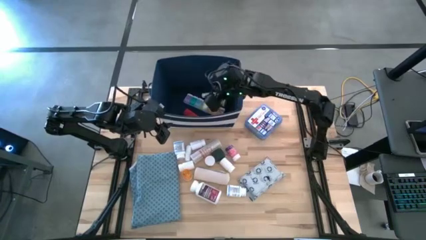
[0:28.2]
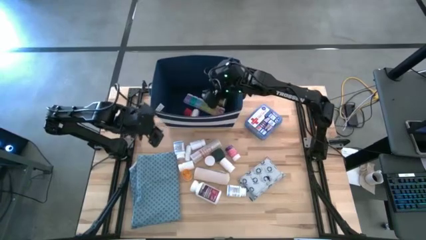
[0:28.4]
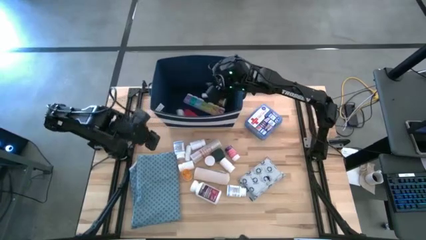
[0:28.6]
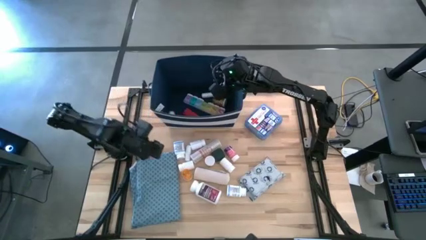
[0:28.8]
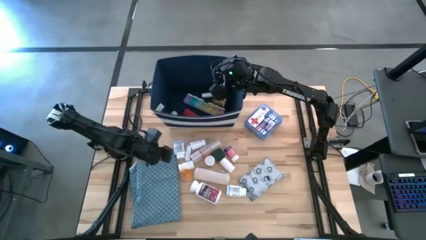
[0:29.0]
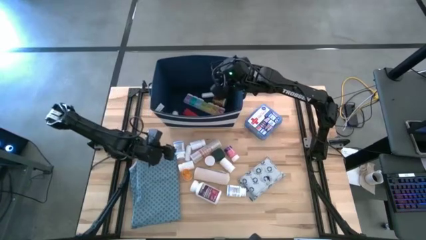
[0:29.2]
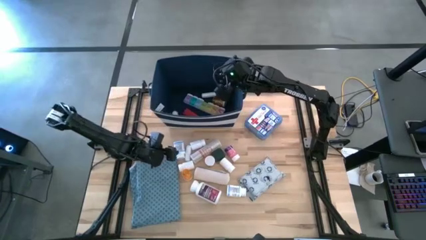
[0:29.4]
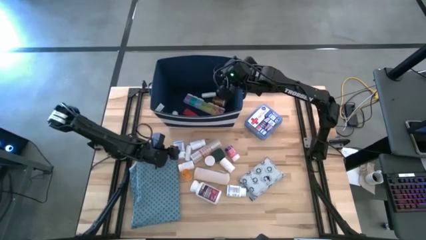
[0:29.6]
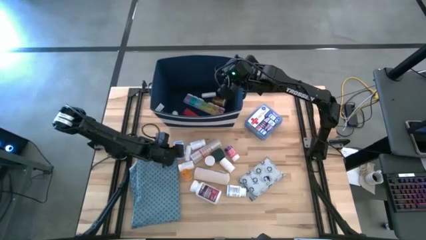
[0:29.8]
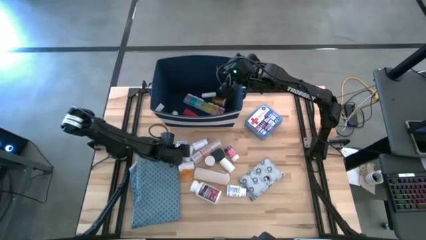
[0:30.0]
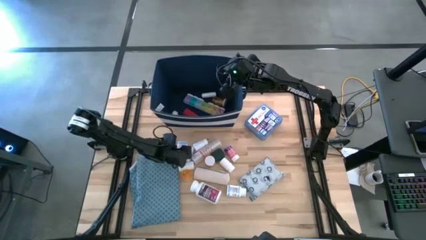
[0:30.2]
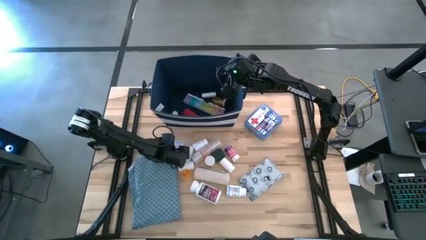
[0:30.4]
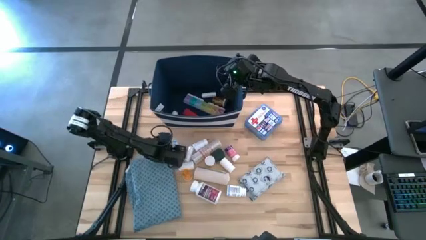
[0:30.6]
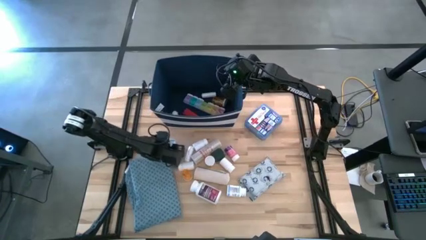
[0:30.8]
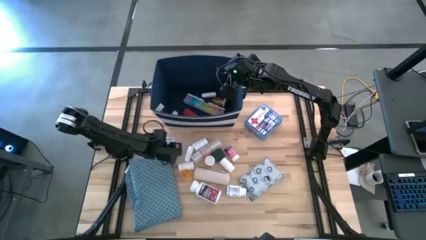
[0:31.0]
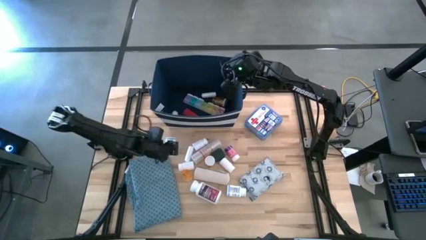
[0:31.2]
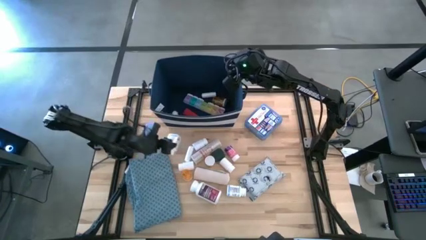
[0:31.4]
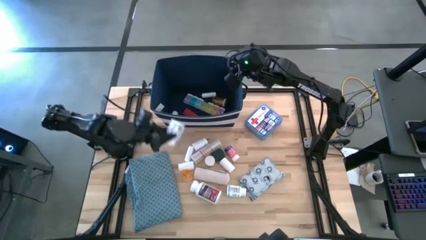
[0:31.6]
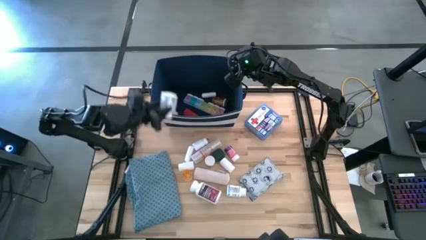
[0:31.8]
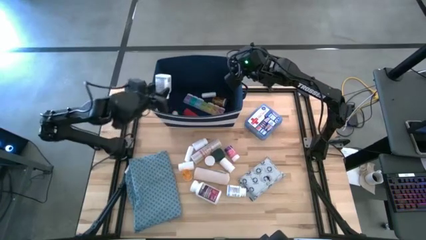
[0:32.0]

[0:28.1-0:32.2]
Task: Pick & place medical supplies in basket/bin
Put the medium white pill bottle into the blue bin

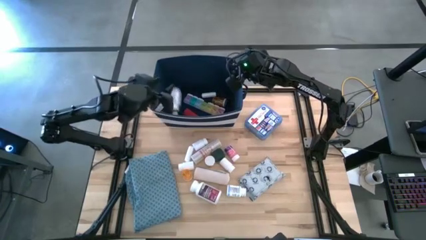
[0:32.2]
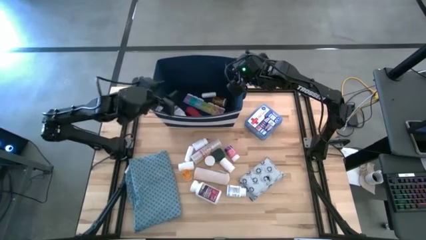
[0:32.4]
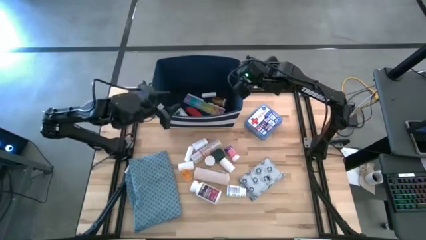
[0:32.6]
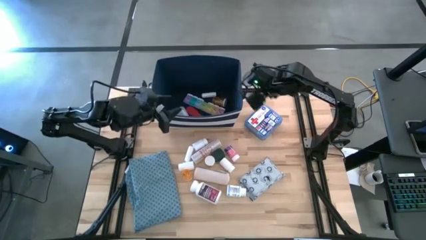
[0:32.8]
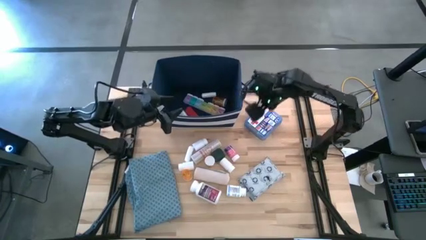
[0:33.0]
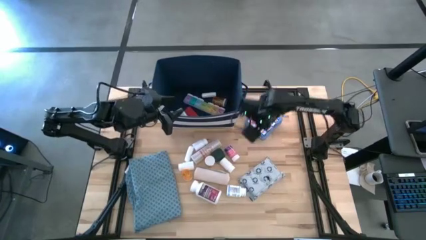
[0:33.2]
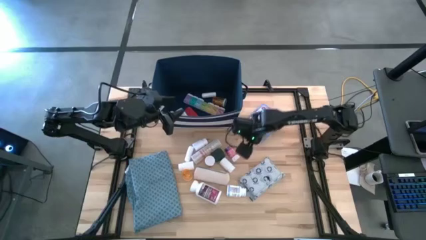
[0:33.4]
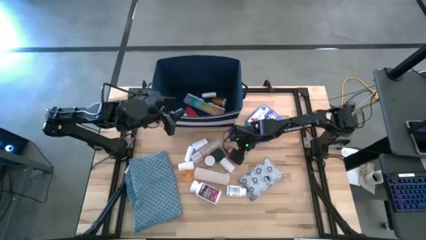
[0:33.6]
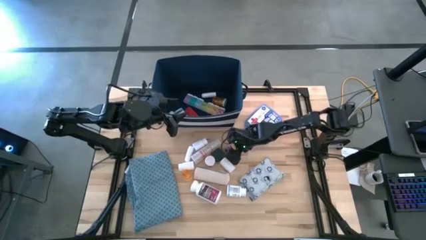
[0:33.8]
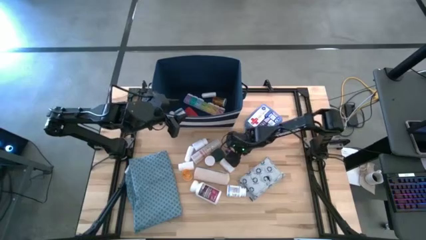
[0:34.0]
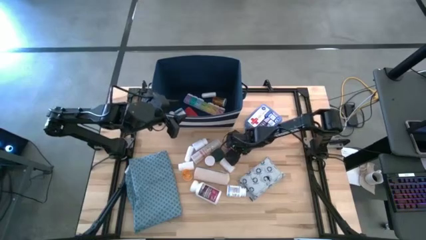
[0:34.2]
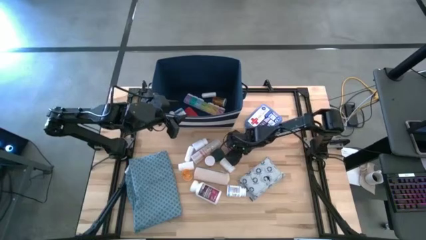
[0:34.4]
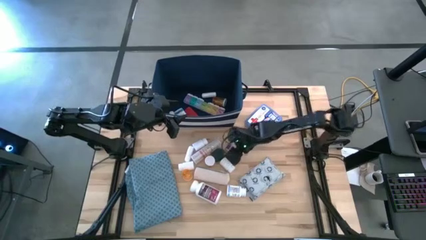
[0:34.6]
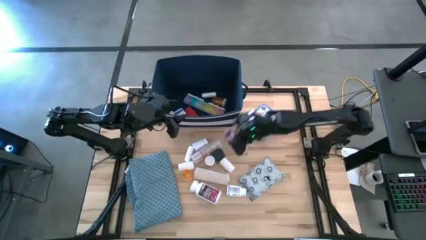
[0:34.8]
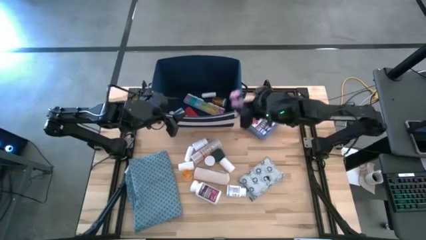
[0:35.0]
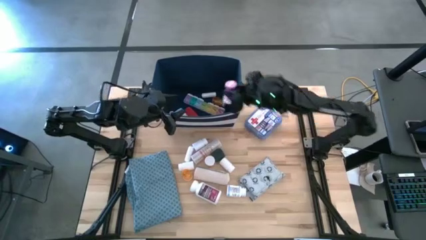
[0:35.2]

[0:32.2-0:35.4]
Put the pink pill bottle into the blue bin

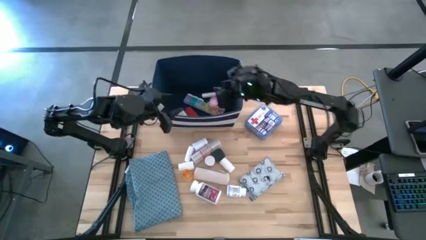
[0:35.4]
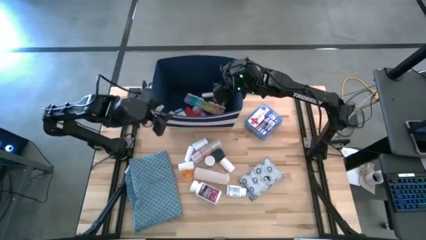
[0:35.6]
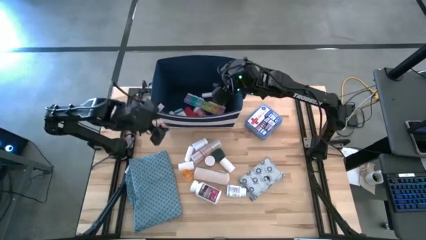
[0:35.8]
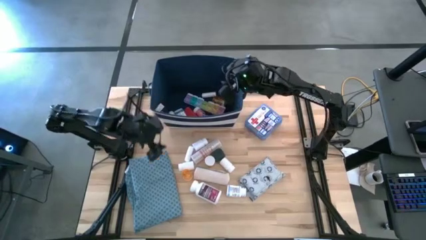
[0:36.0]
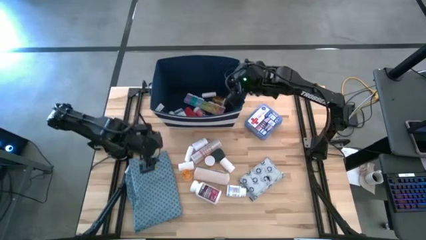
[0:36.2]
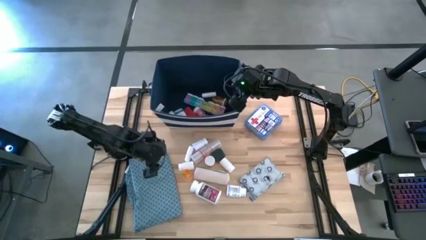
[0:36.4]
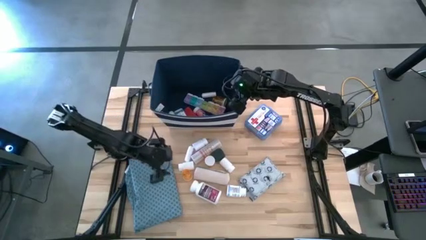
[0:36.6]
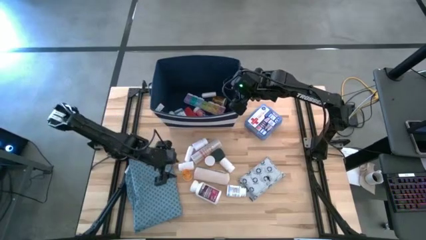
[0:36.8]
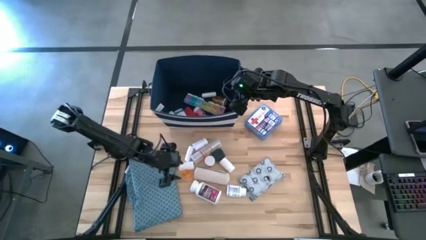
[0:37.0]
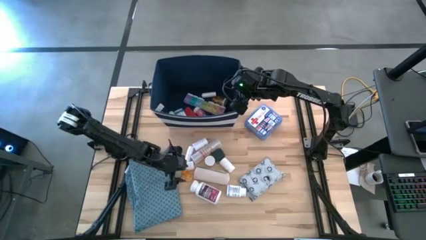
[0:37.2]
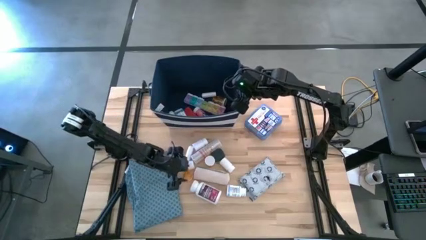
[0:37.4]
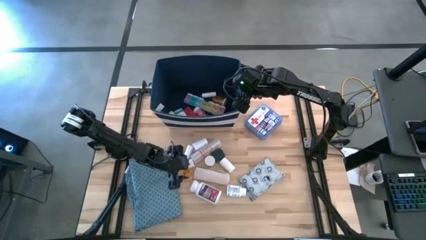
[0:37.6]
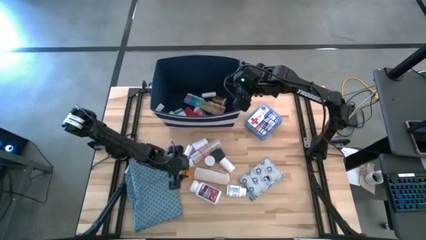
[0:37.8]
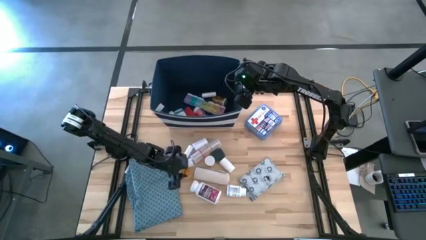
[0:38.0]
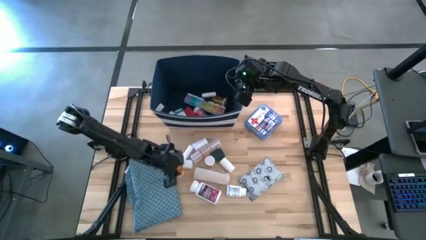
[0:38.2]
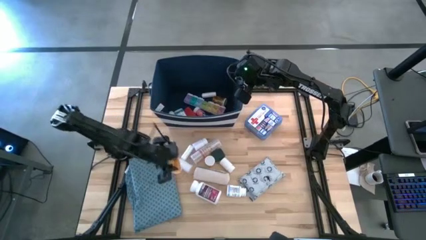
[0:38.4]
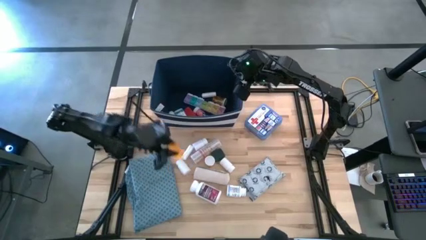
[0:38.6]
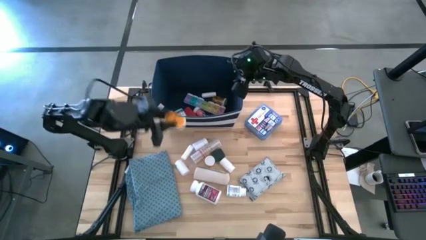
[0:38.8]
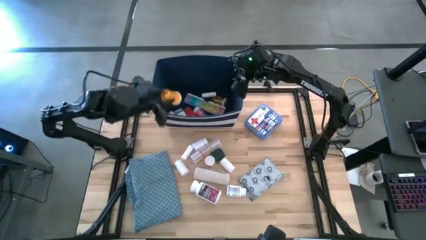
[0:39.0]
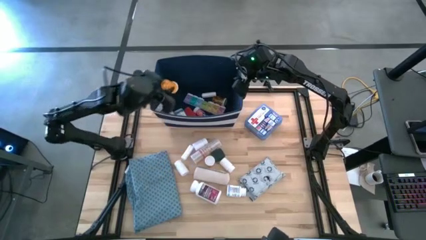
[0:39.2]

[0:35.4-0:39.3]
Put the orange pill bottle into the blue bin

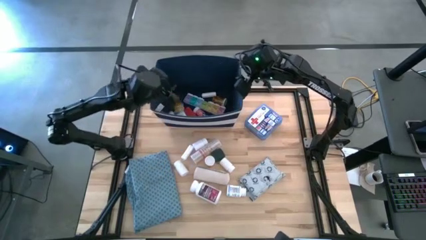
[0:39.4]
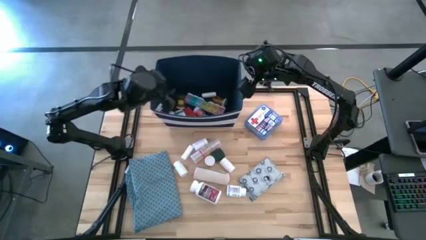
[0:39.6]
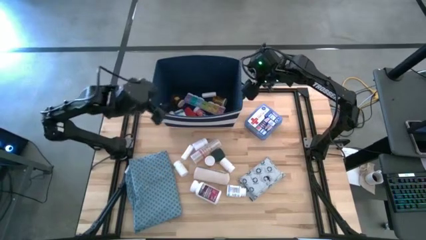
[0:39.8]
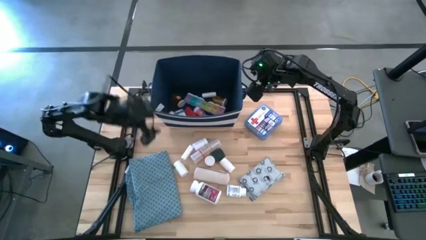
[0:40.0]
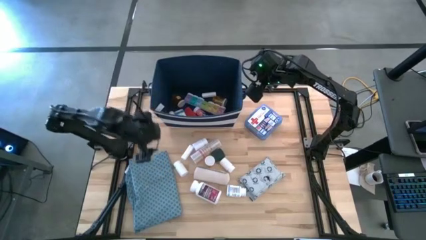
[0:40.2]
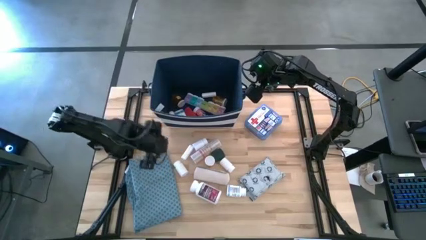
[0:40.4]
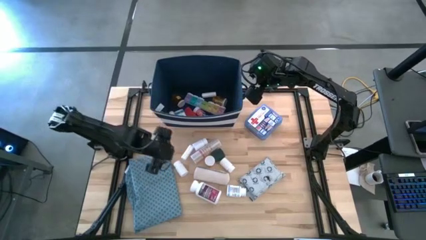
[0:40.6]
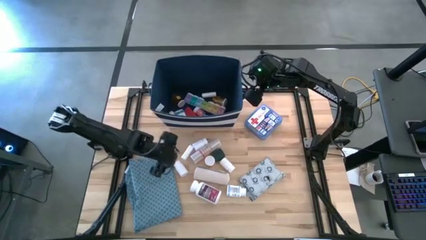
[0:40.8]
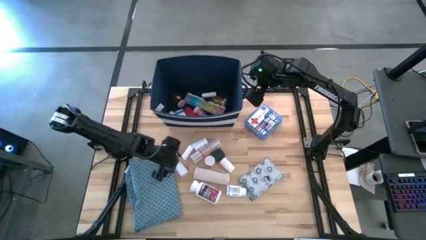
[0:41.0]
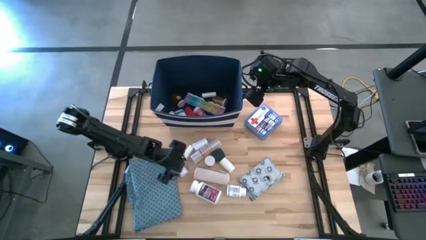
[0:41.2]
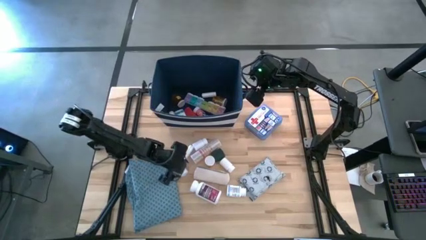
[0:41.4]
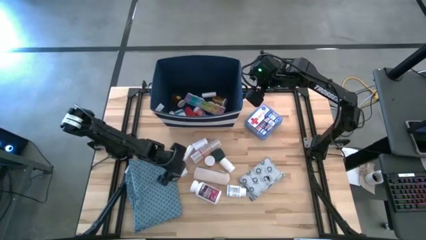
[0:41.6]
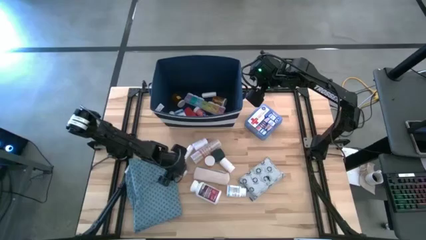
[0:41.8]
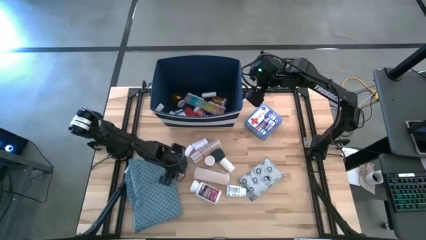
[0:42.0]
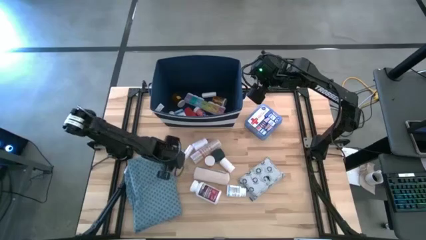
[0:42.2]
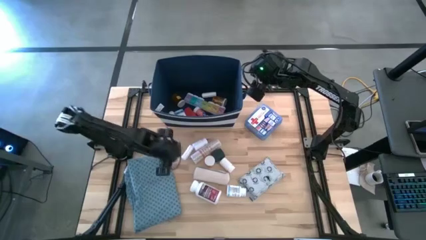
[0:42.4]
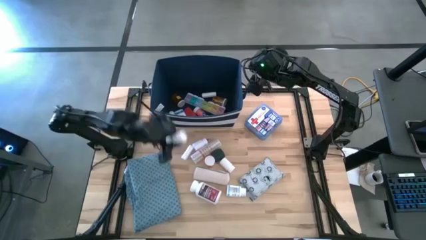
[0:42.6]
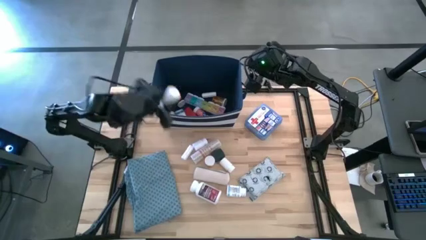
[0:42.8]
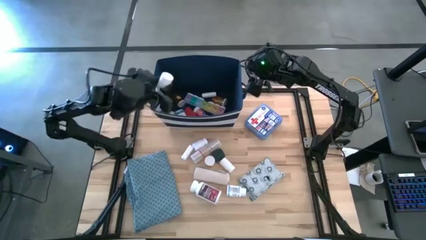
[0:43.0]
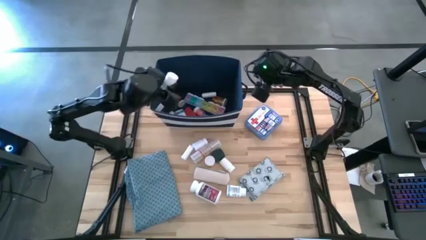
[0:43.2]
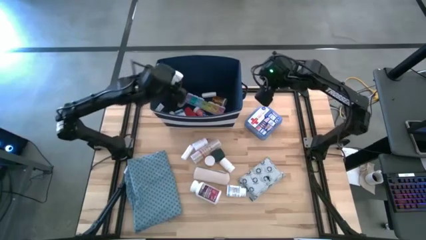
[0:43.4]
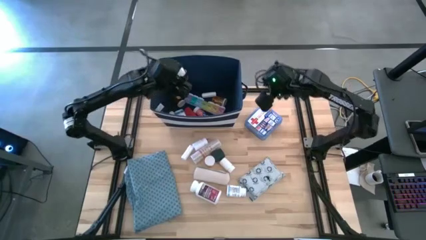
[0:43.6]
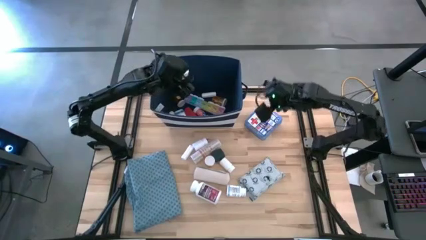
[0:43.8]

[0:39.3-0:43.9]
Put the small white pill bottle into the blue bin

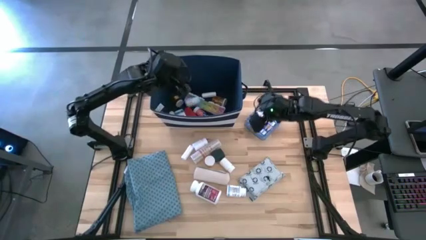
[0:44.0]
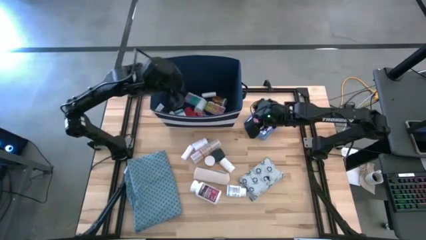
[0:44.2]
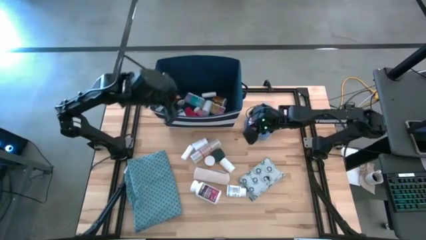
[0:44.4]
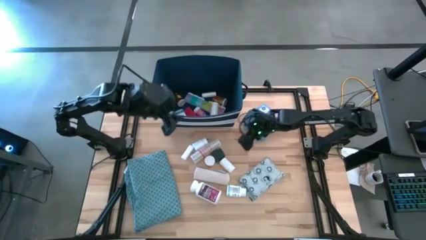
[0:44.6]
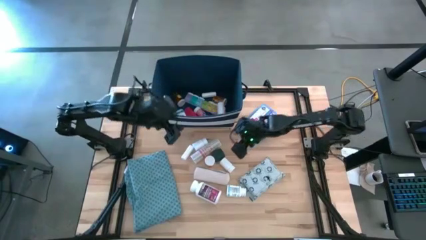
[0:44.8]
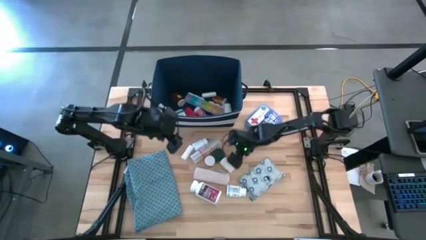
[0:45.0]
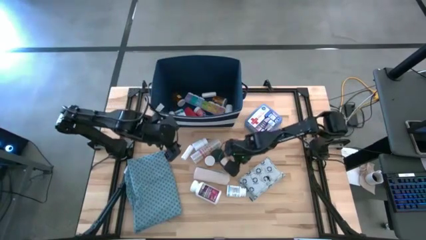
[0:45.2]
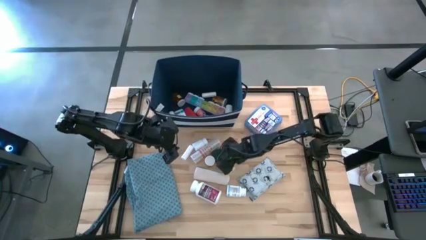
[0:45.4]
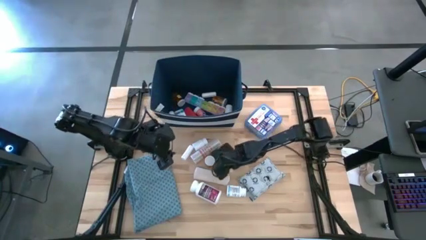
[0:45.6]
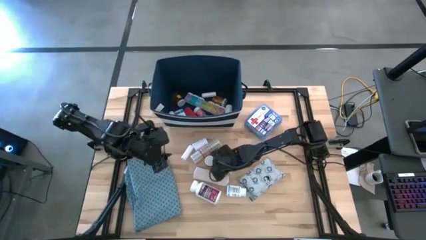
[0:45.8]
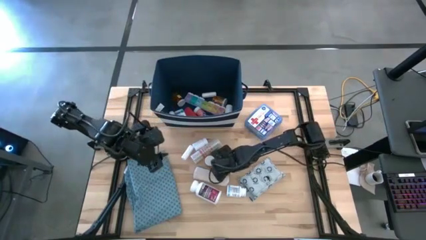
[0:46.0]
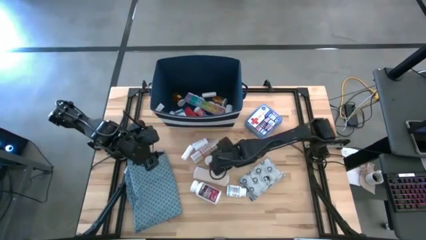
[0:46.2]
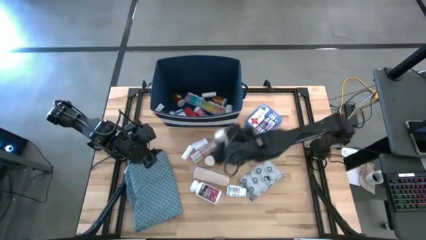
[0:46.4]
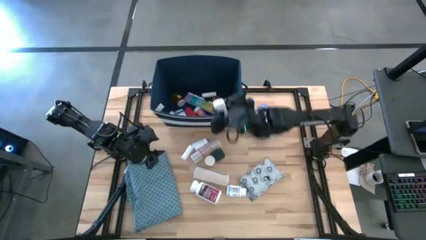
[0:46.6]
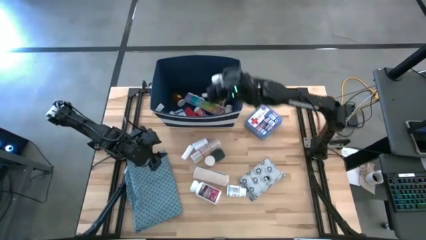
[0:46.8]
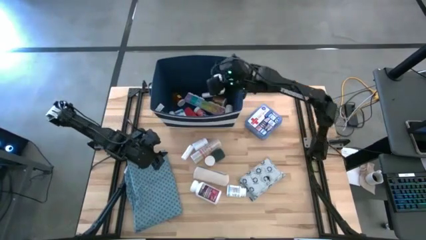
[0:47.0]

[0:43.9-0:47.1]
Put the small white pill bottle into the blue bin
